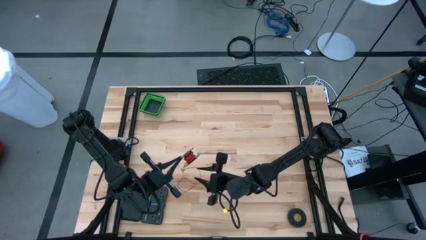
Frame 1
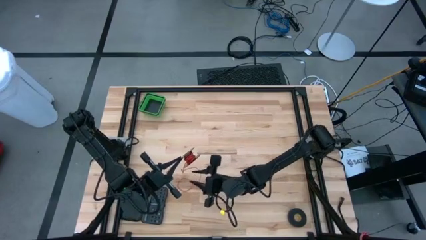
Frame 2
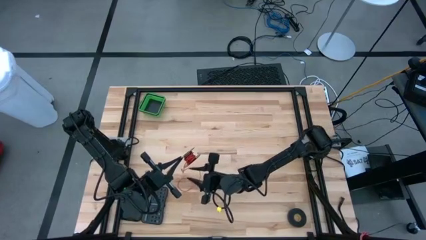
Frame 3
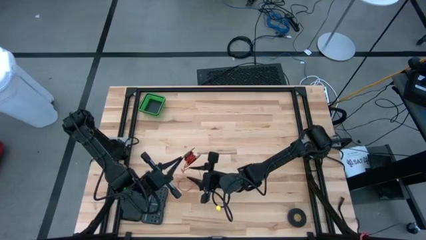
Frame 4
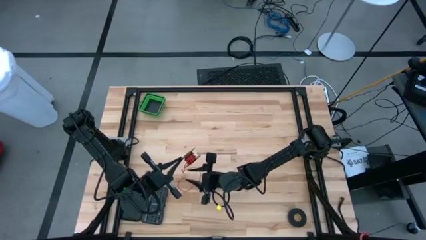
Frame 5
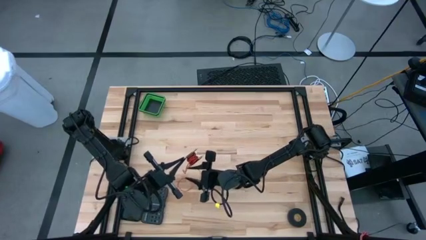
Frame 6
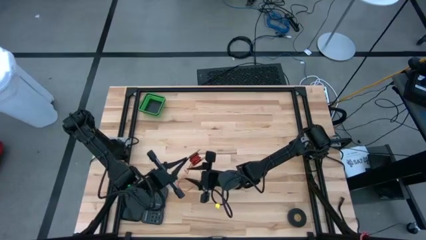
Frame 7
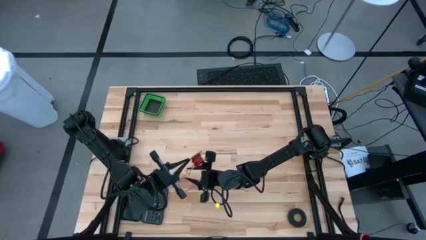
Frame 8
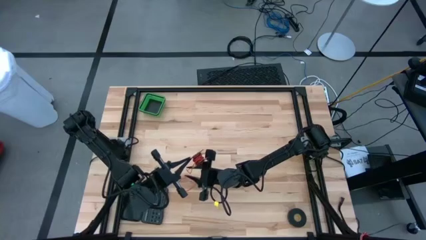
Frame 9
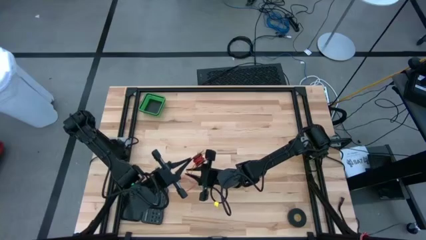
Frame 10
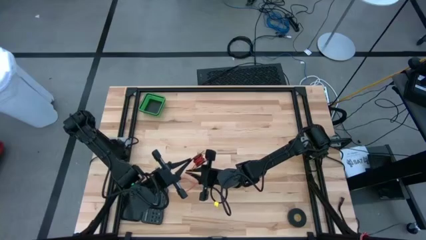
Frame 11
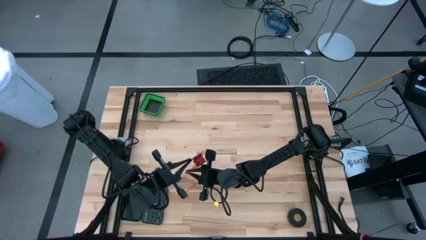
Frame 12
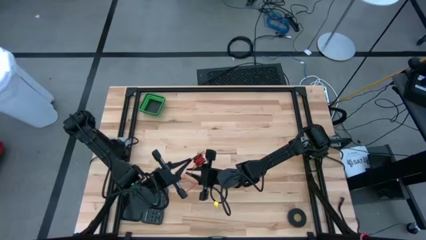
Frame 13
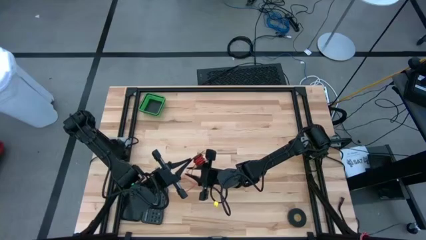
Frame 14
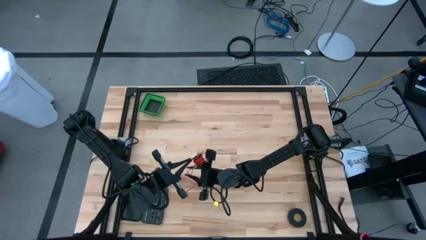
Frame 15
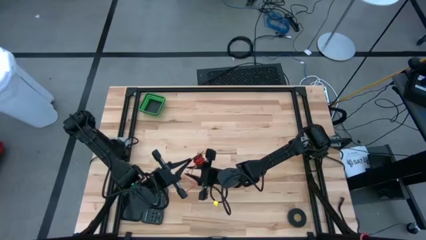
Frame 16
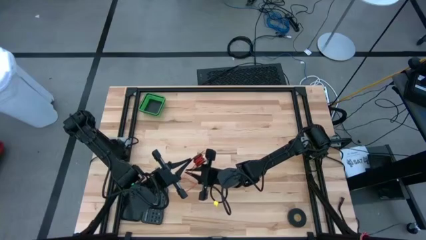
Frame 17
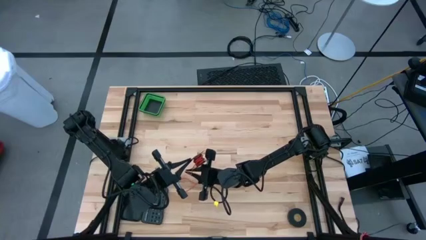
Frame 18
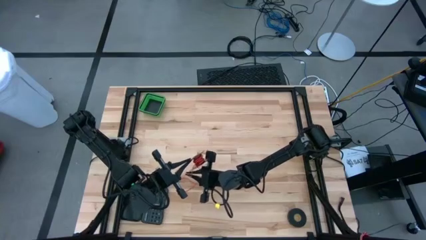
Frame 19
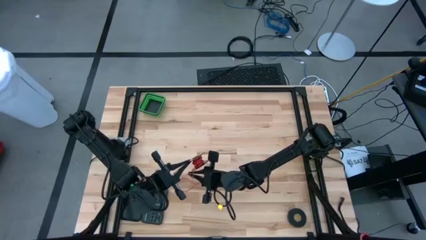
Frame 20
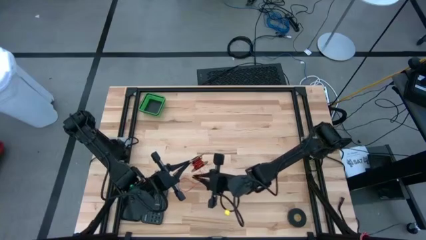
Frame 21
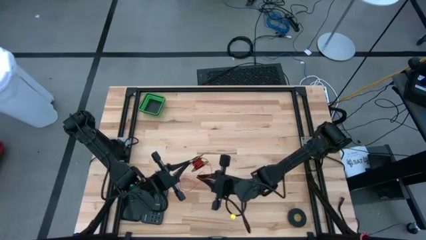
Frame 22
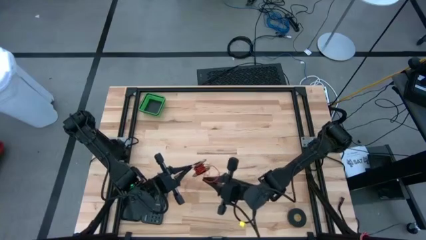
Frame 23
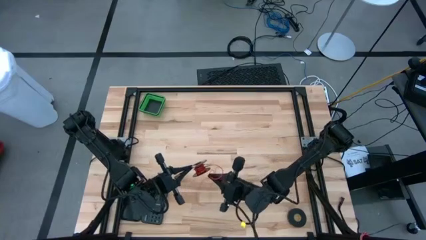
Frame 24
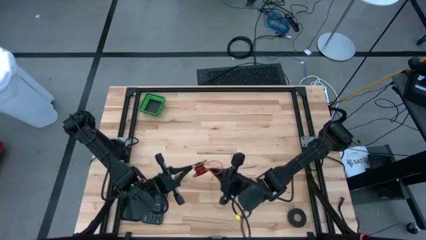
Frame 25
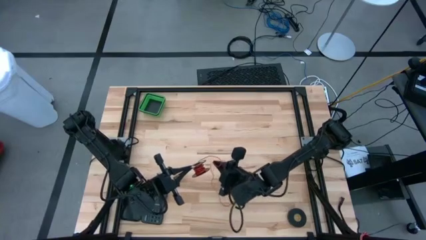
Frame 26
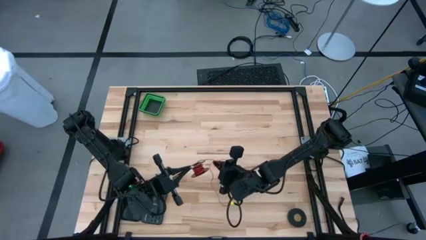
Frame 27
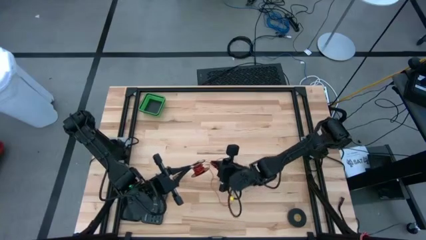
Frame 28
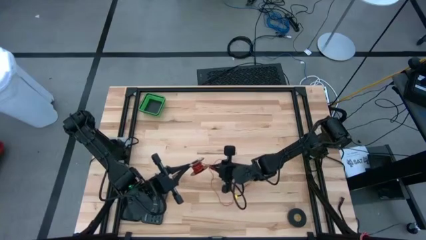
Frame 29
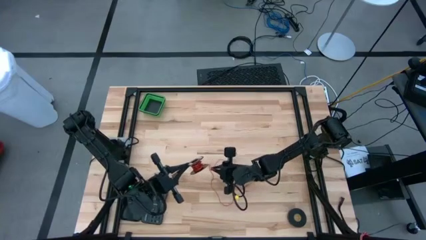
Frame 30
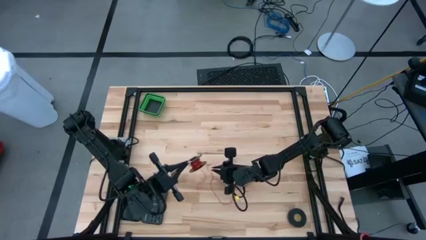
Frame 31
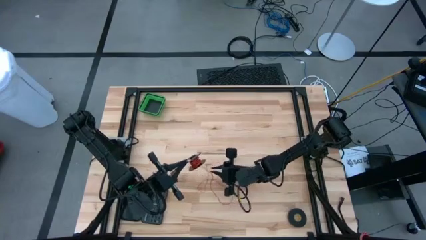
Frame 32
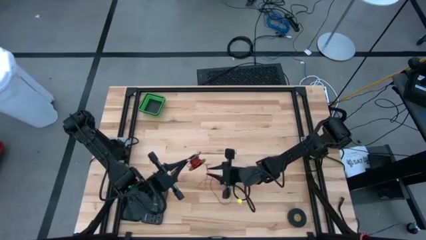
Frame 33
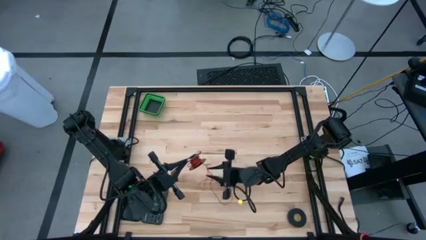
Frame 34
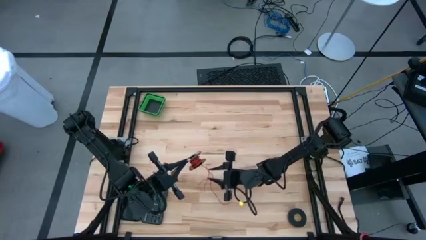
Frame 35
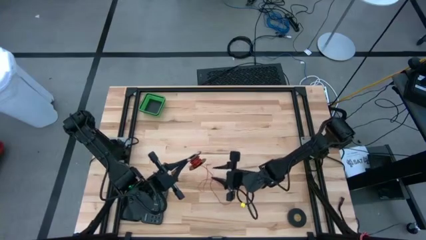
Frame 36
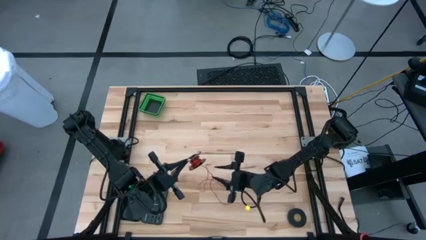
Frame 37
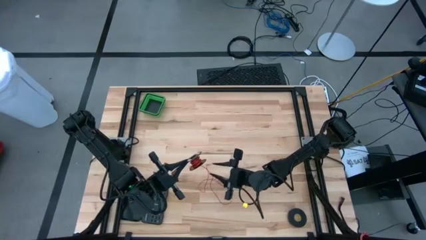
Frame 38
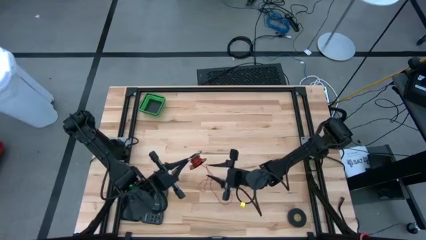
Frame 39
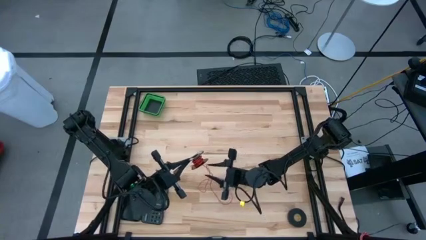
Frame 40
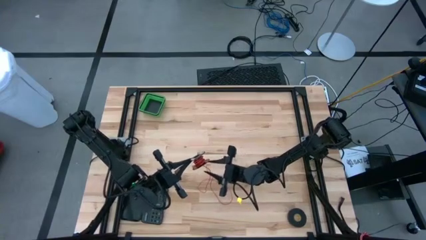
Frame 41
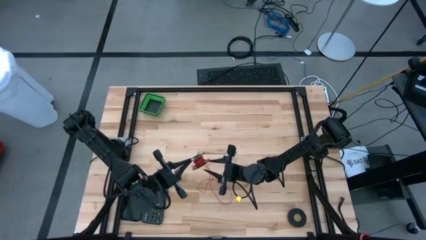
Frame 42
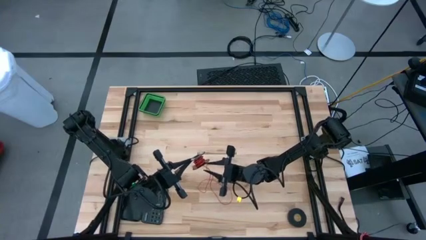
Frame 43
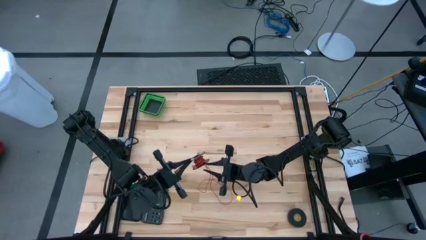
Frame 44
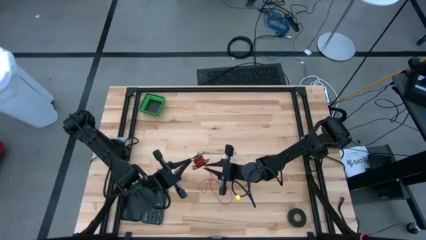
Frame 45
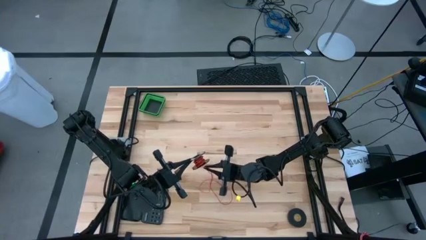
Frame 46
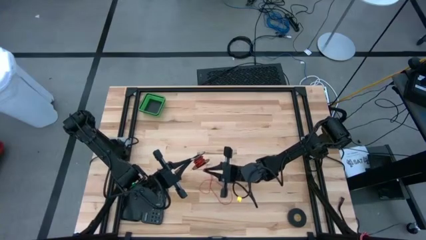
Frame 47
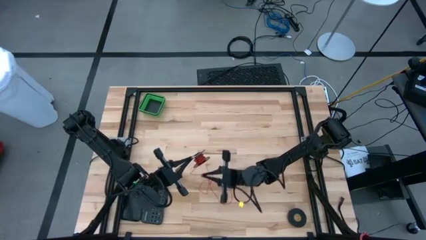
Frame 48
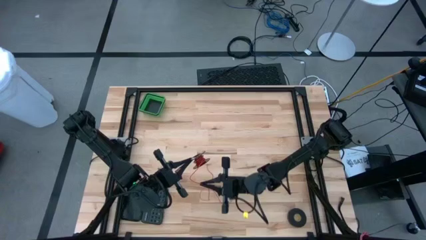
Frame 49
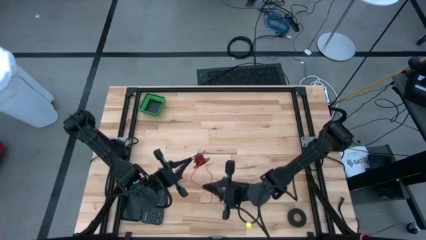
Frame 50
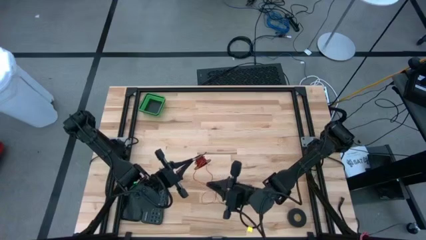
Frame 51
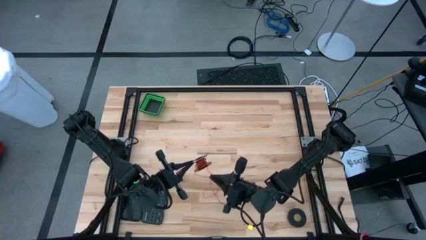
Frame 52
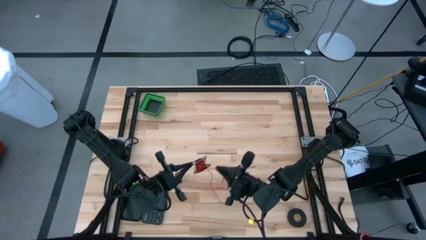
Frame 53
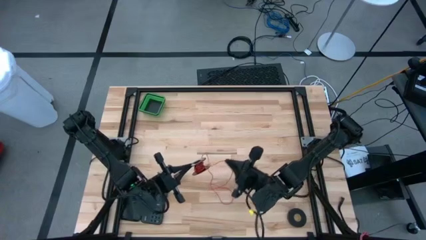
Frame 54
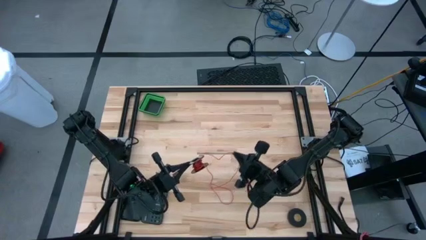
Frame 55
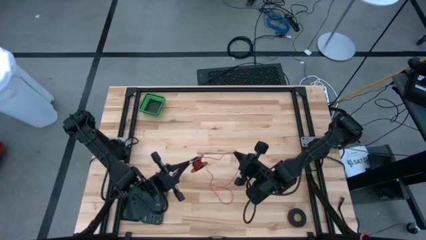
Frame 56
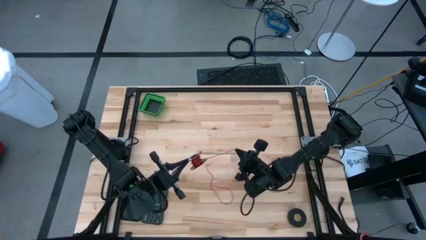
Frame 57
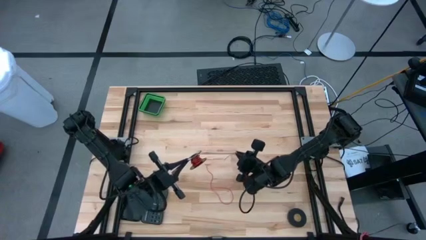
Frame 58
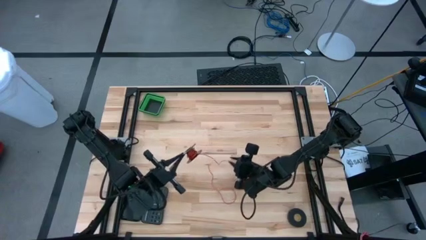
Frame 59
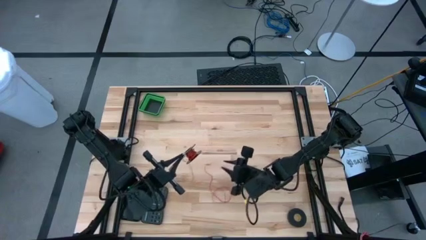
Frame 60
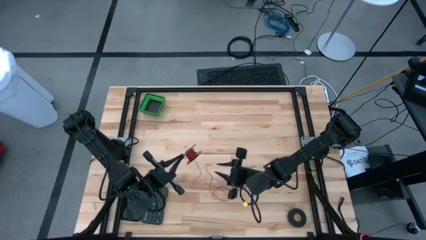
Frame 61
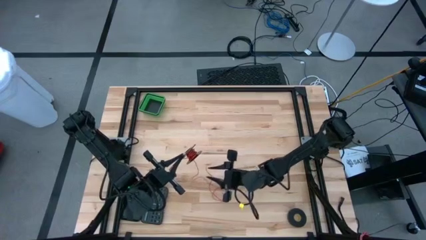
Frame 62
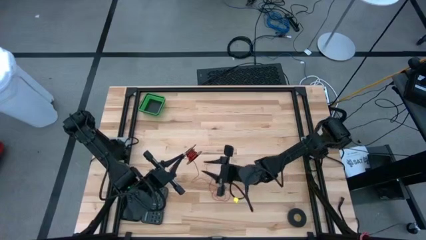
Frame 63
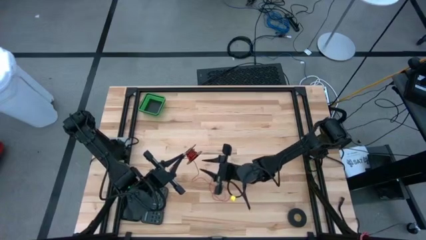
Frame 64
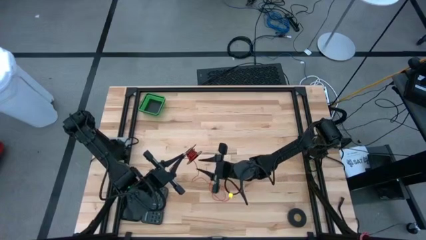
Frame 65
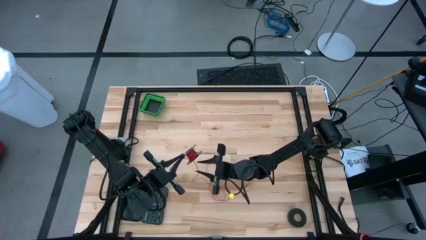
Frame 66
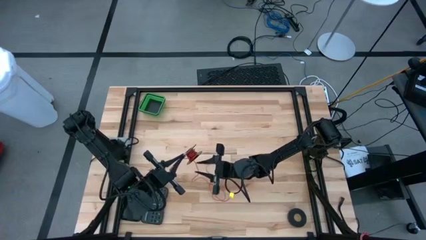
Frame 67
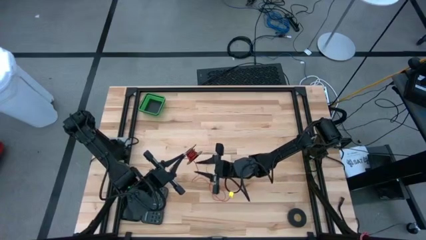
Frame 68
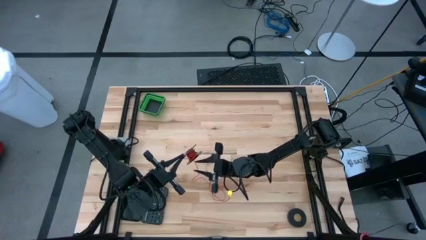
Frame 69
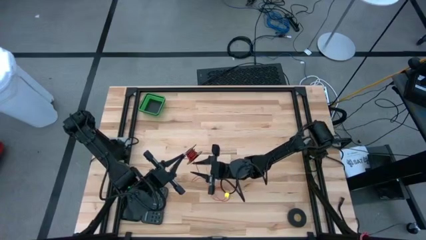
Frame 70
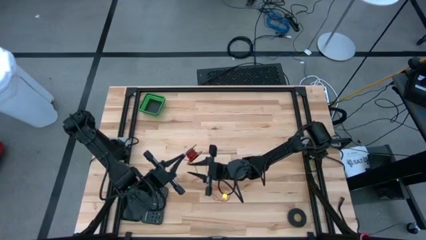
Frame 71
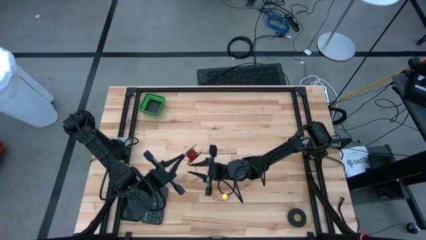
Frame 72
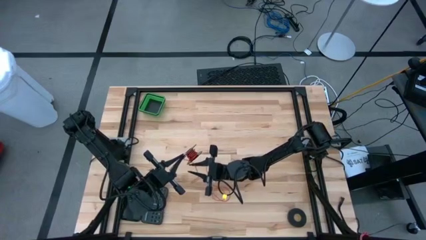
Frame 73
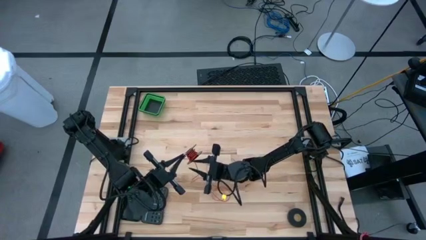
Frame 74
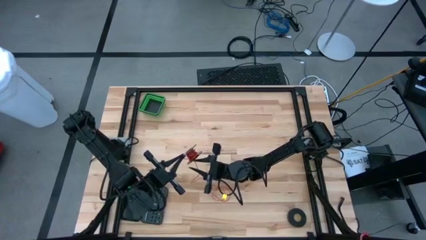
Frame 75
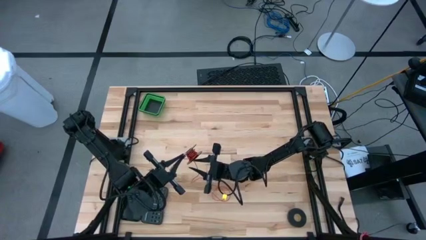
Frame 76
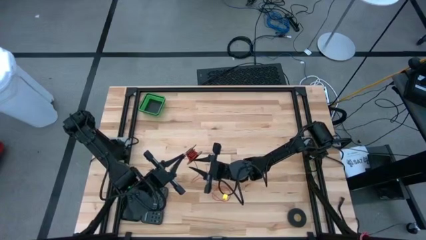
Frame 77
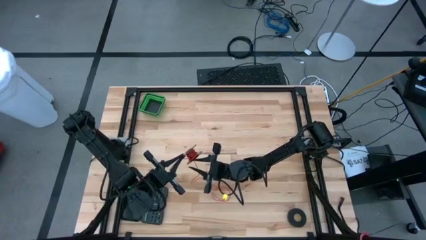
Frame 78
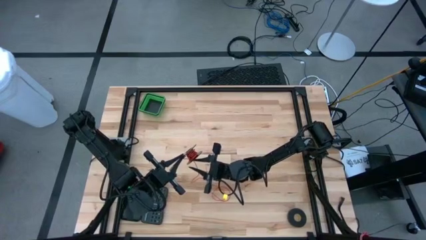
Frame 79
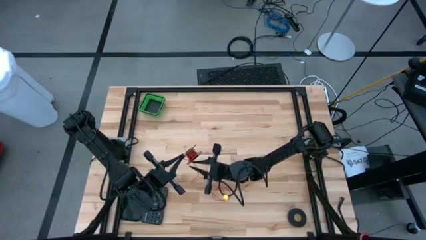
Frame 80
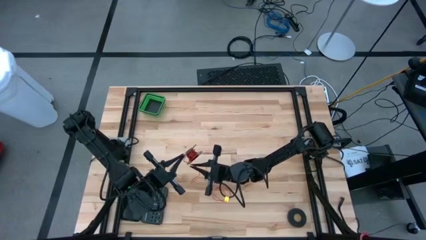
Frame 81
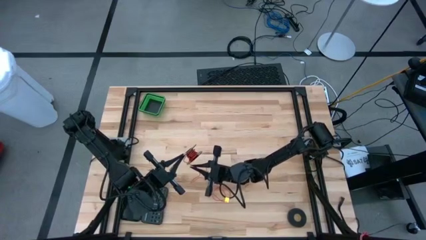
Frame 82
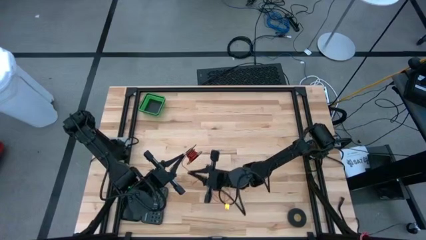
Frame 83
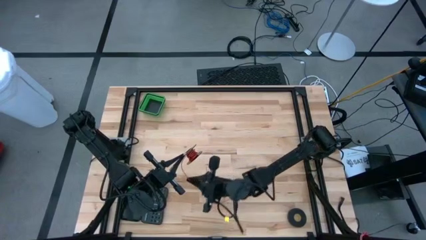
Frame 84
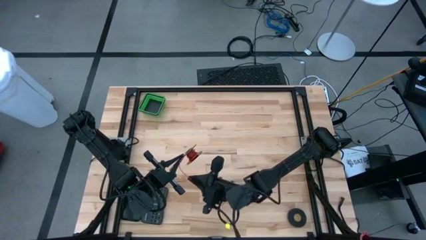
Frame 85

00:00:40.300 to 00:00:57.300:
Task: Coil cords
Uncoil the red wire from the spool
